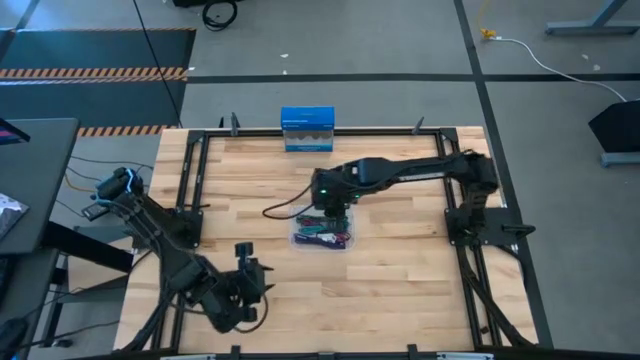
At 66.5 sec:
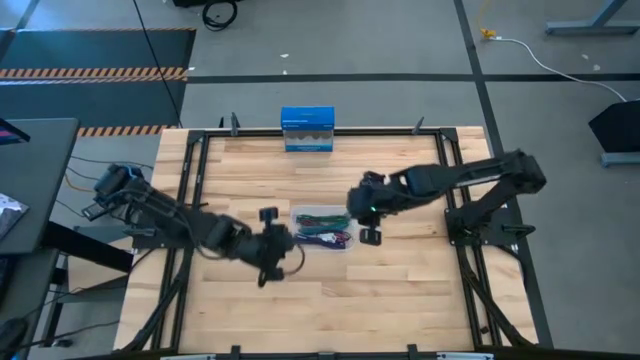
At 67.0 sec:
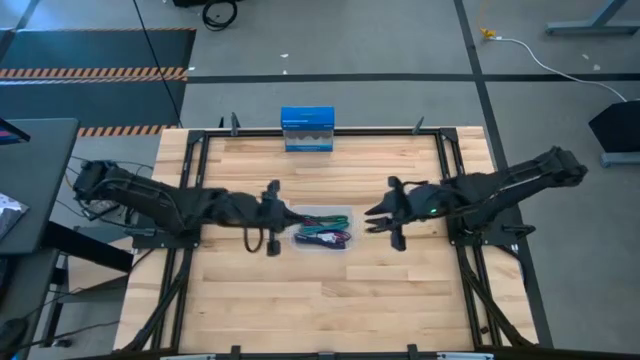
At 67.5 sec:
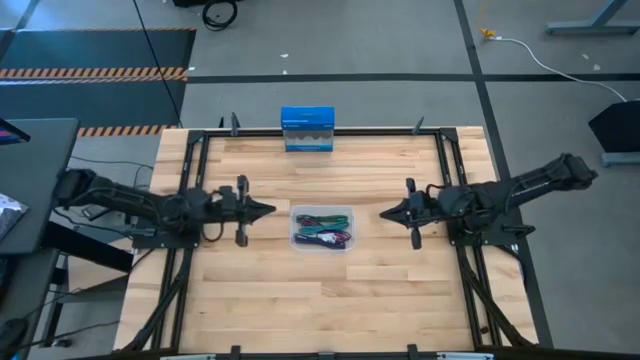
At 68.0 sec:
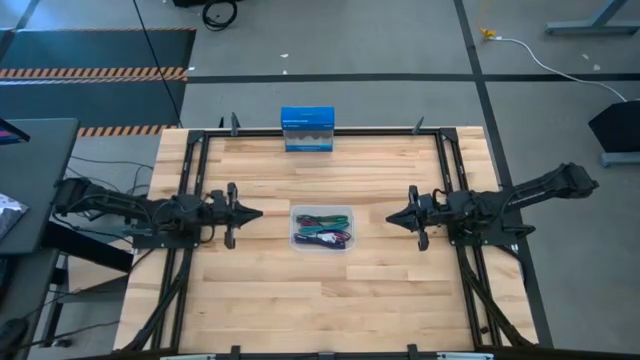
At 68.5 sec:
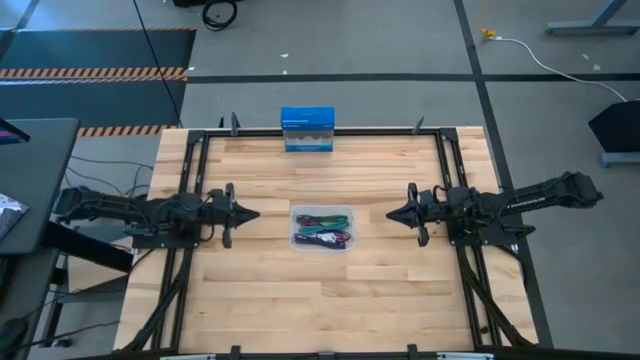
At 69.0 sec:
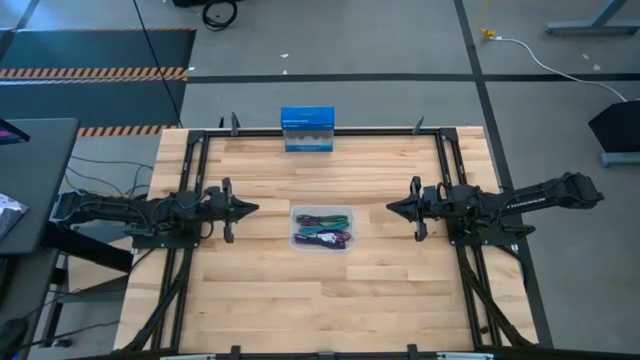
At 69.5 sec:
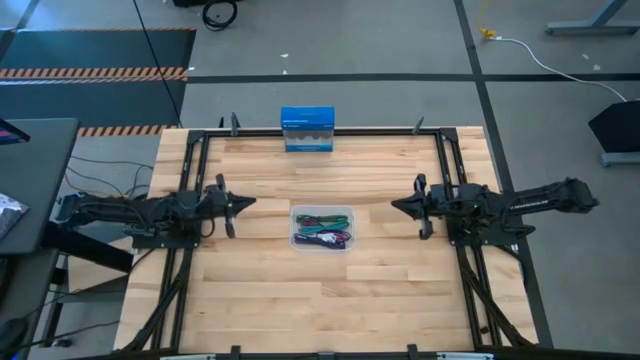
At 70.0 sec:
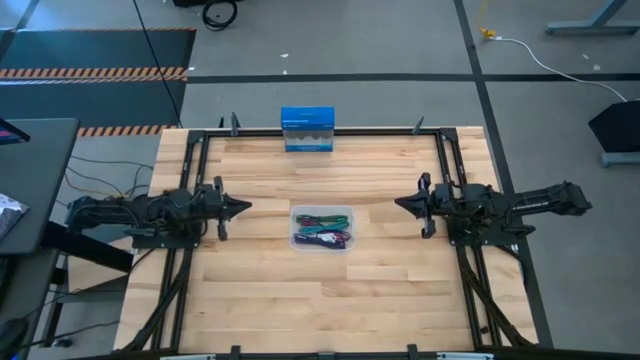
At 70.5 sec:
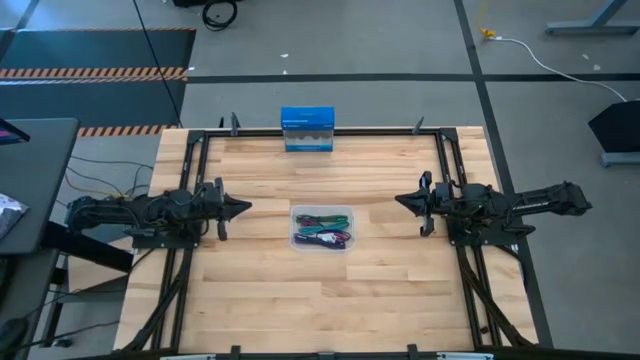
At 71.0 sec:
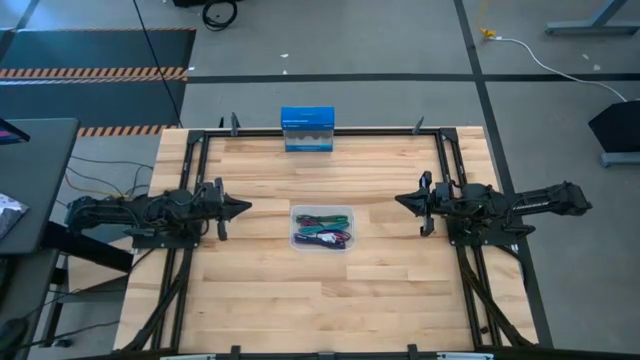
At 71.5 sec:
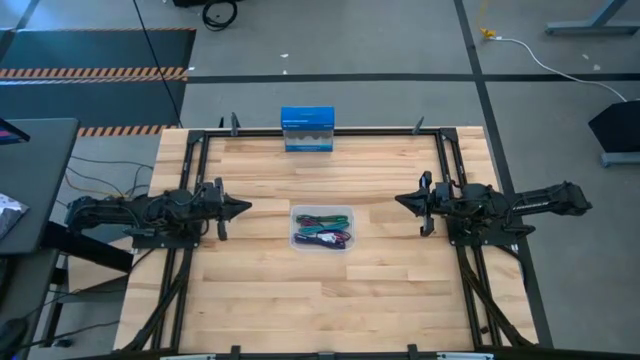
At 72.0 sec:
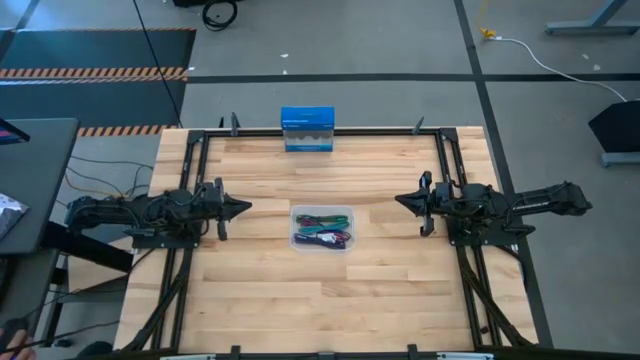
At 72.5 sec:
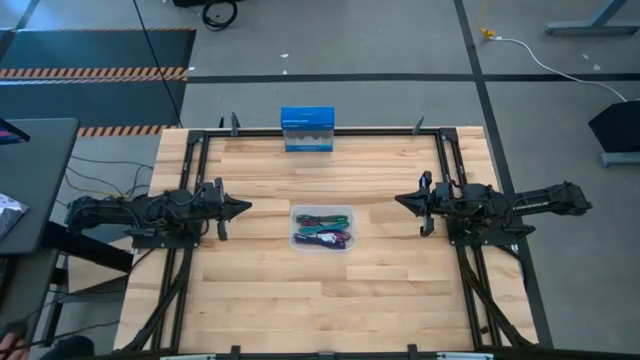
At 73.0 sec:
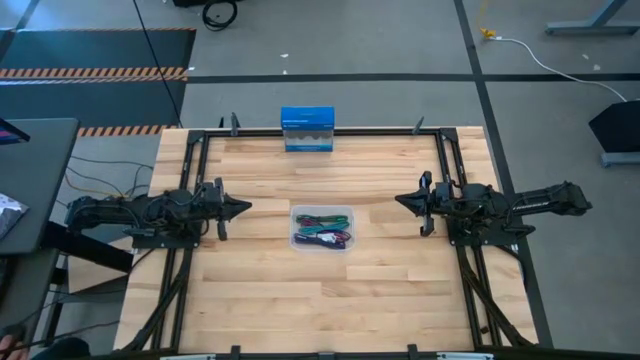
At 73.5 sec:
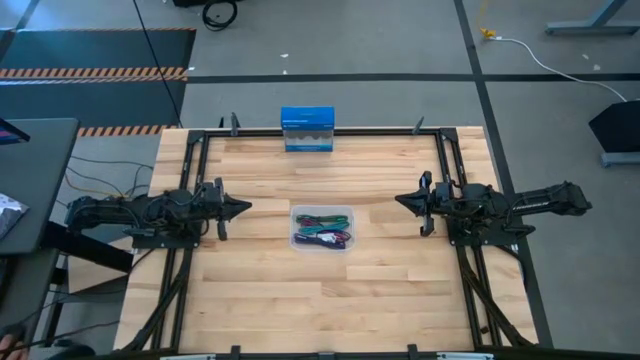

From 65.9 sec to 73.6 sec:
Task: Pick and place USB-C Cables
Return to Home Position

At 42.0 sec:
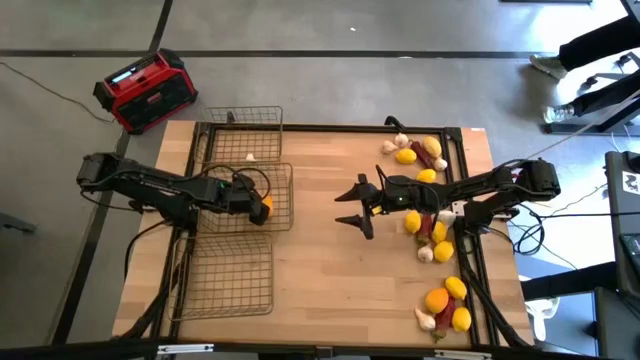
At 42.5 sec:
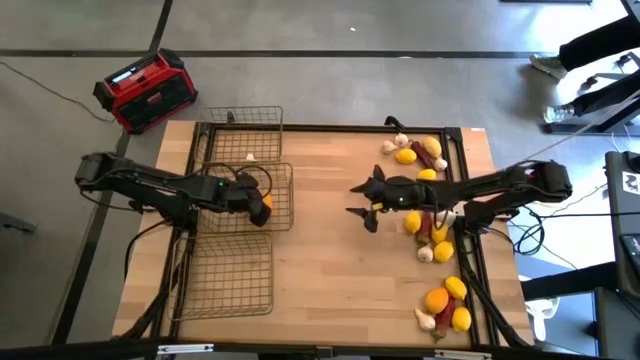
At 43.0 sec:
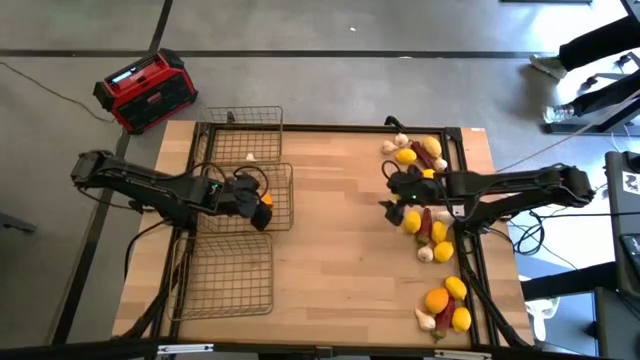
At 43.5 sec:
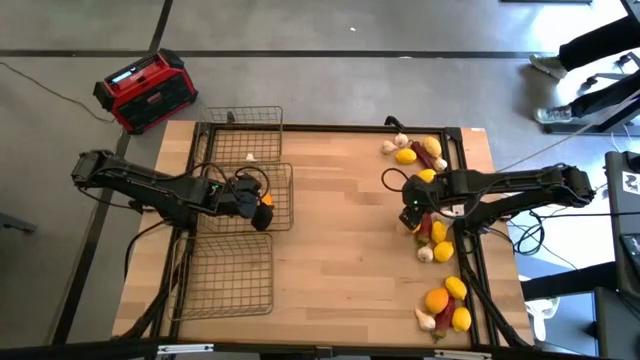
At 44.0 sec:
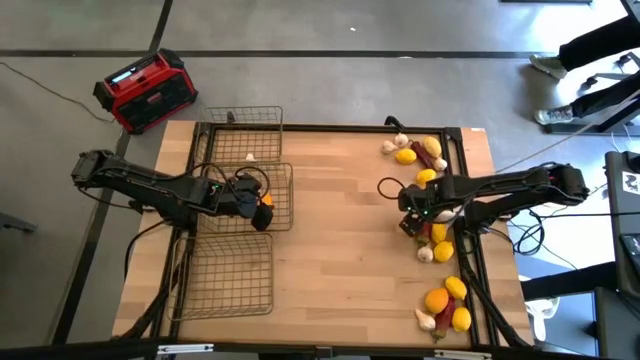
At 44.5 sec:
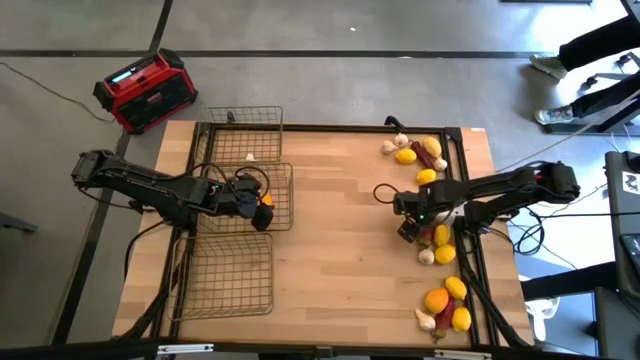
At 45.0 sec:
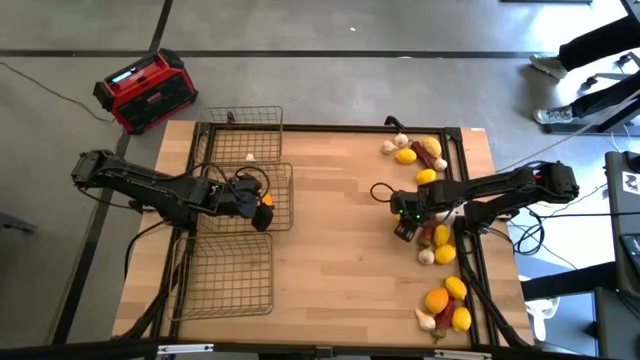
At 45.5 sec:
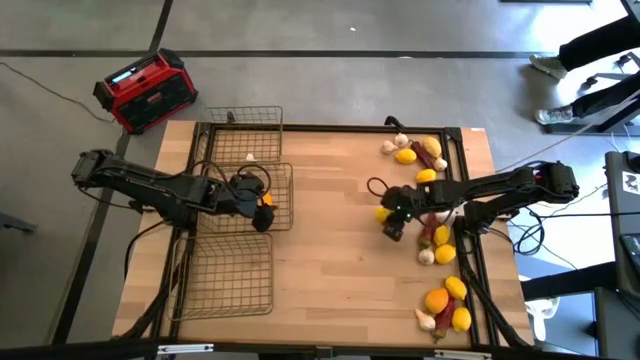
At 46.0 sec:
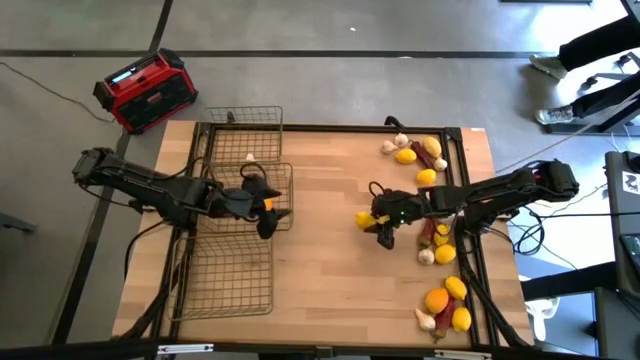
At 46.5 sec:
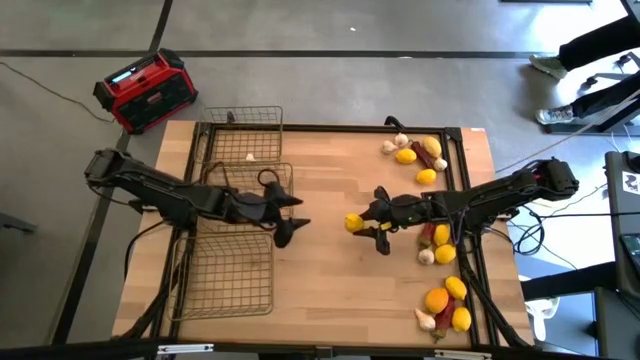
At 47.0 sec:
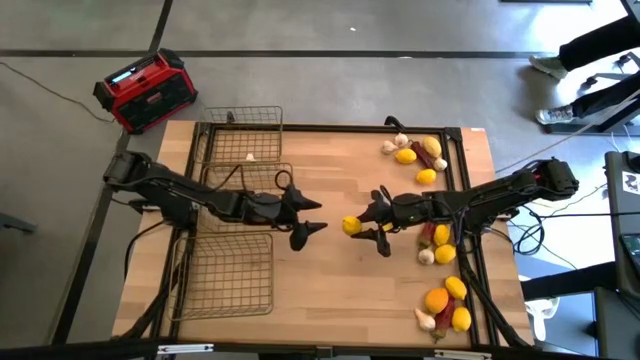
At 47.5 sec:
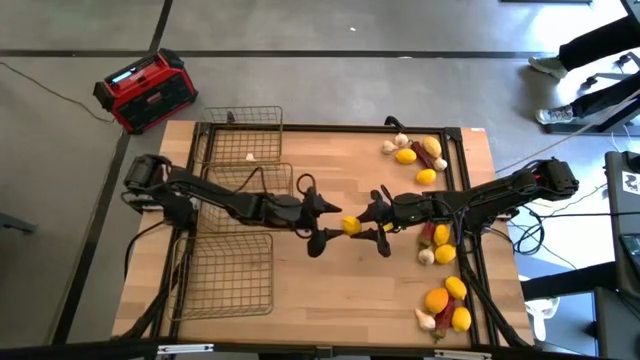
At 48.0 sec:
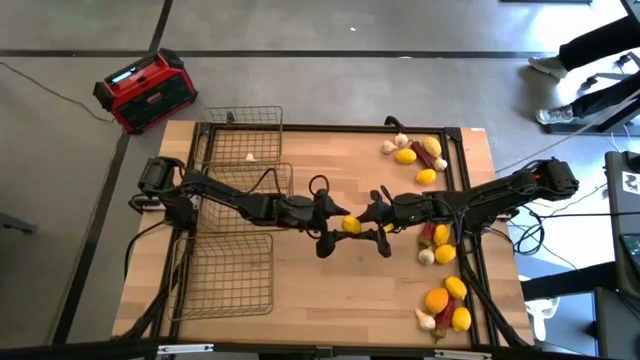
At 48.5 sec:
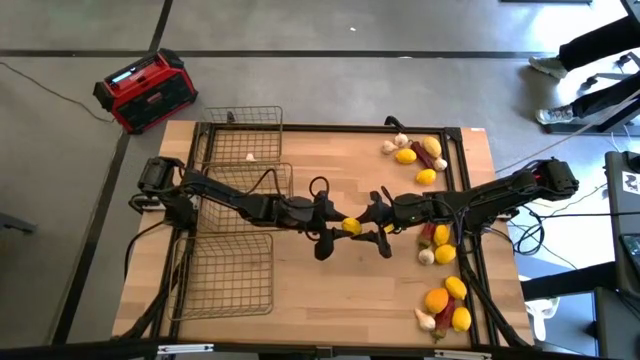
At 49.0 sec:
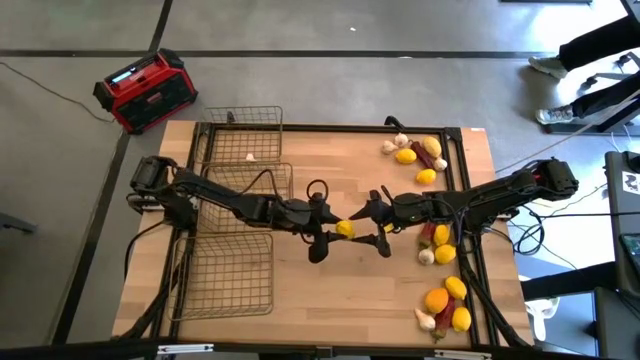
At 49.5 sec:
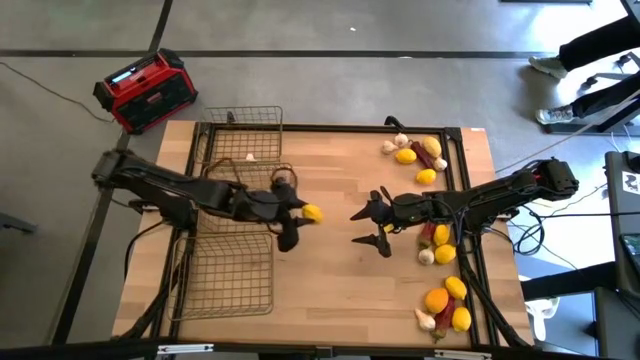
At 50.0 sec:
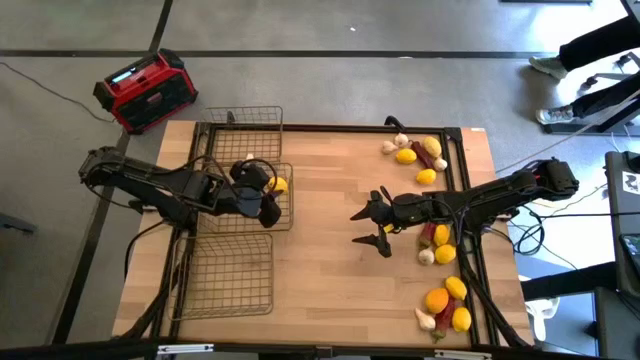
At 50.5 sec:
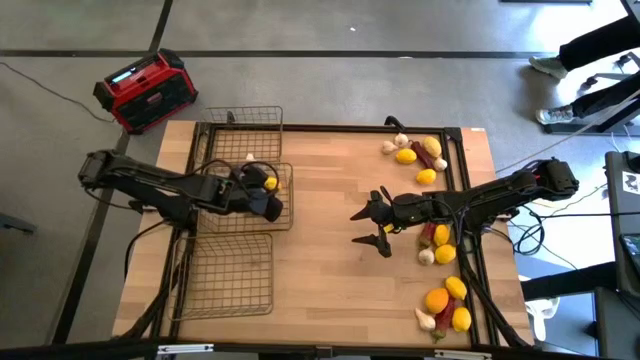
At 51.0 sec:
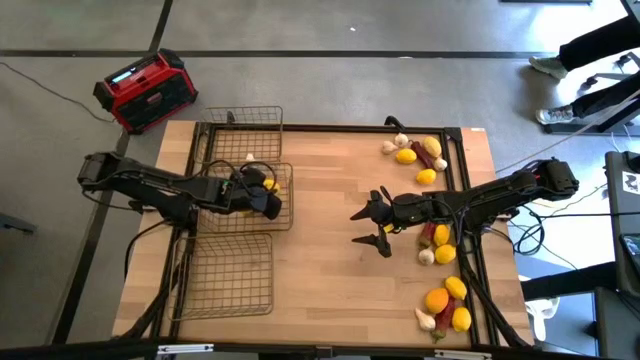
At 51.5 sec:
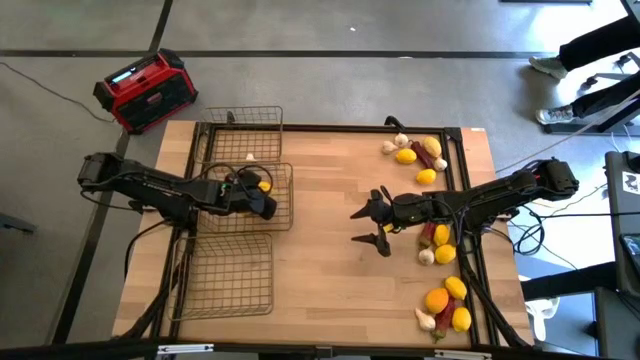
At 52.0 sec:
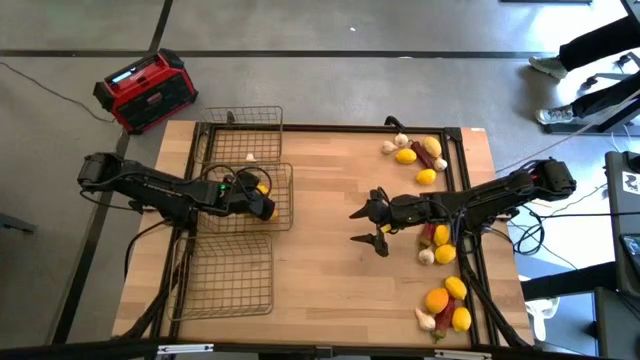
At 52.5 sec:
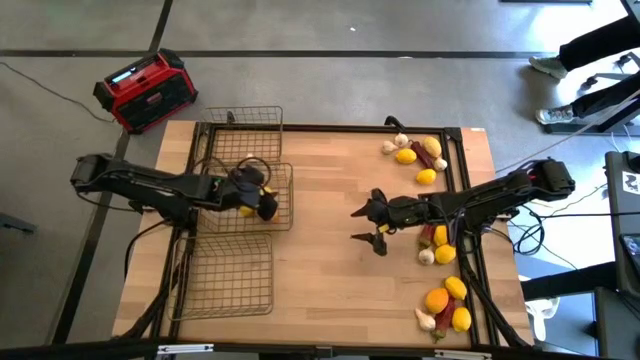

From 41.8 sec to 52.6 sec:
Task: Sort produce into baskets
Put the lemon in the middle wire basket
